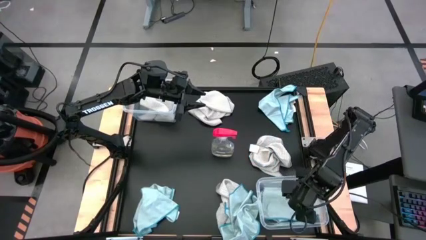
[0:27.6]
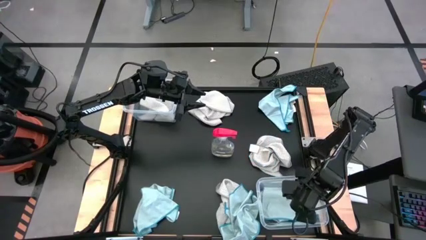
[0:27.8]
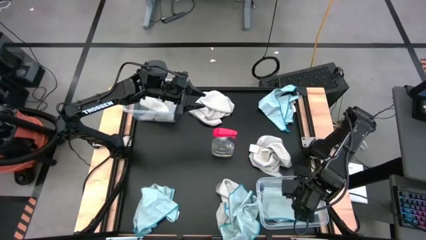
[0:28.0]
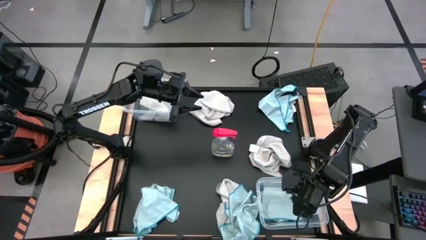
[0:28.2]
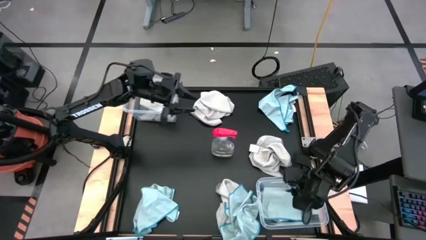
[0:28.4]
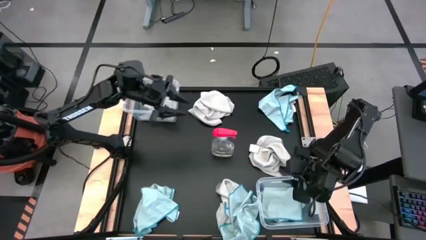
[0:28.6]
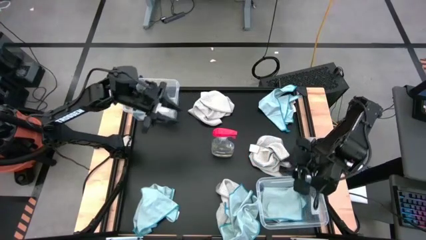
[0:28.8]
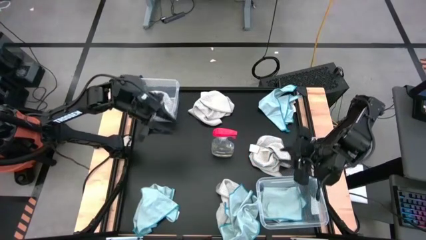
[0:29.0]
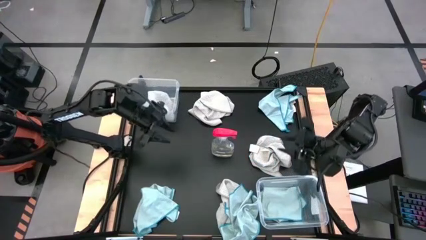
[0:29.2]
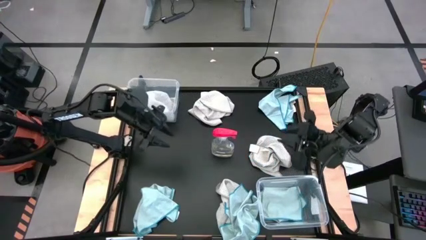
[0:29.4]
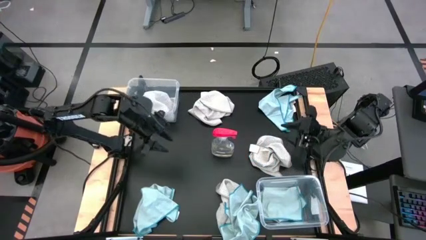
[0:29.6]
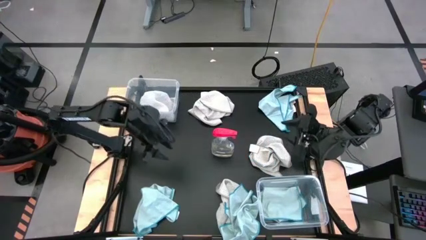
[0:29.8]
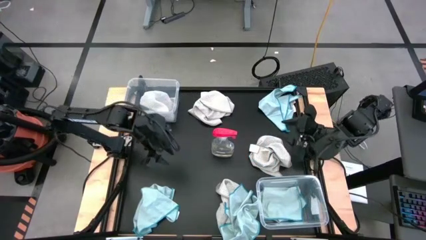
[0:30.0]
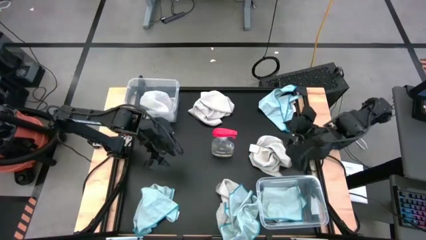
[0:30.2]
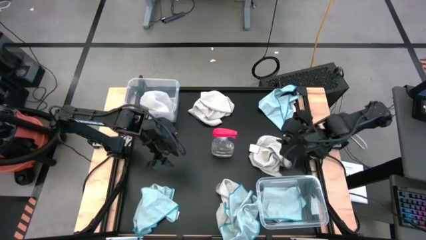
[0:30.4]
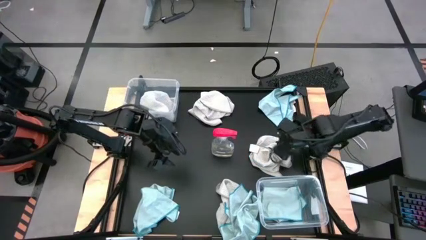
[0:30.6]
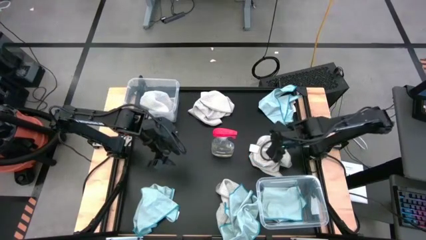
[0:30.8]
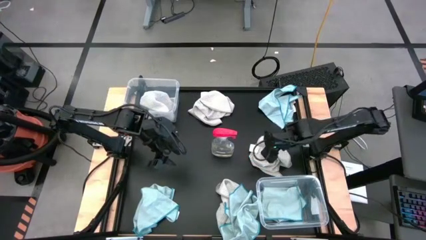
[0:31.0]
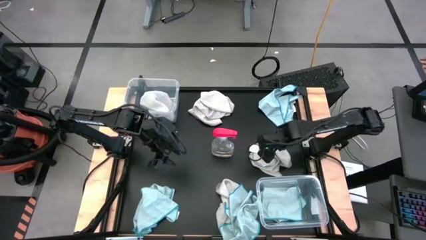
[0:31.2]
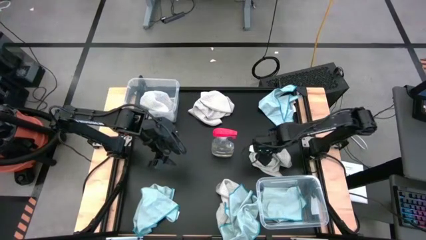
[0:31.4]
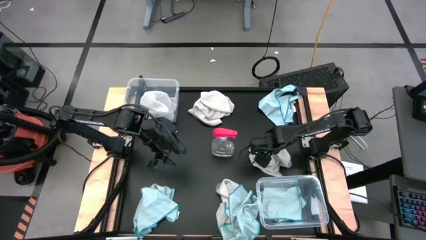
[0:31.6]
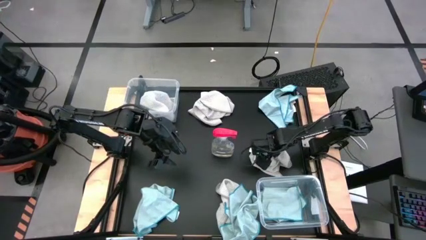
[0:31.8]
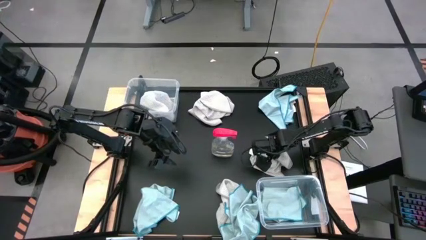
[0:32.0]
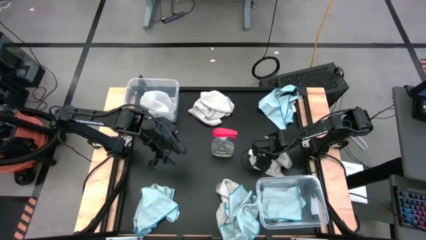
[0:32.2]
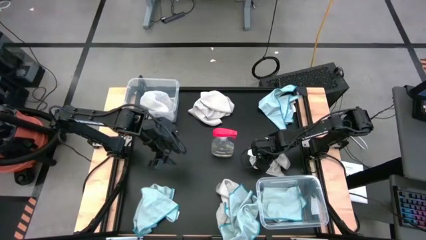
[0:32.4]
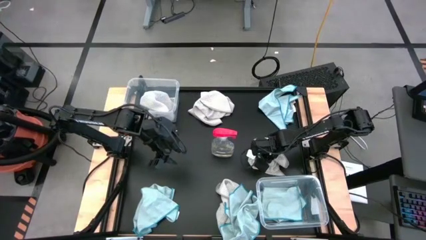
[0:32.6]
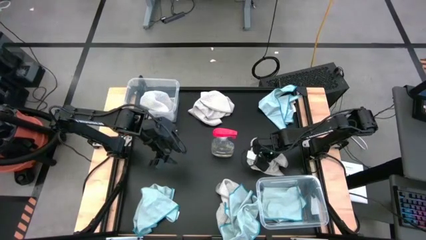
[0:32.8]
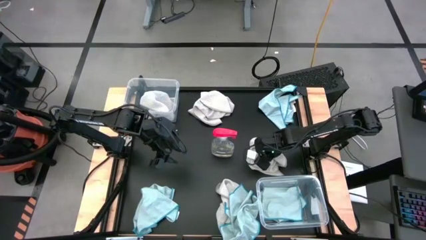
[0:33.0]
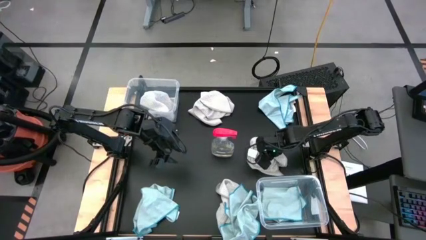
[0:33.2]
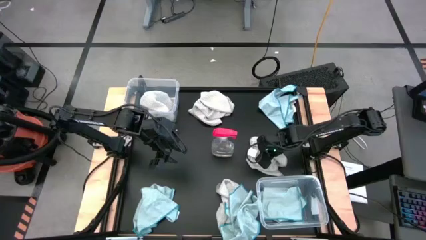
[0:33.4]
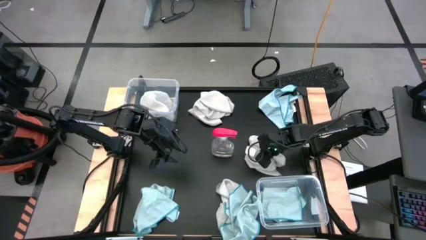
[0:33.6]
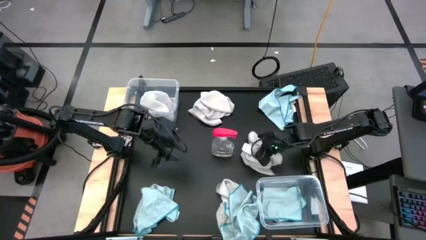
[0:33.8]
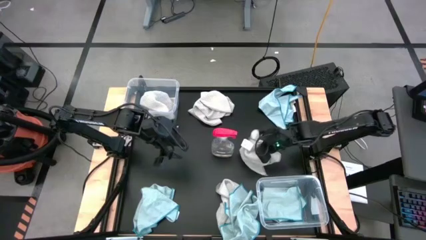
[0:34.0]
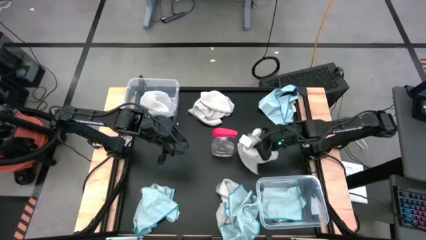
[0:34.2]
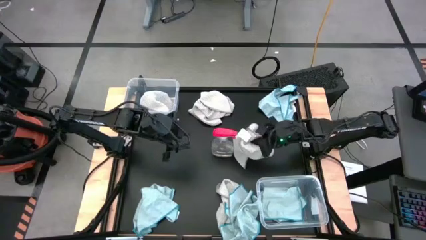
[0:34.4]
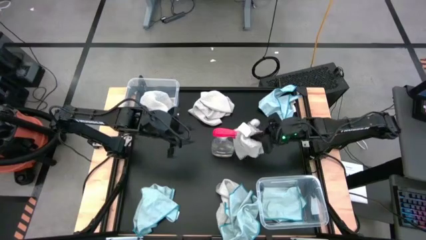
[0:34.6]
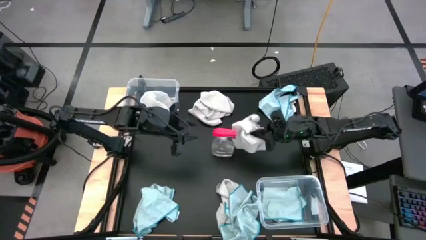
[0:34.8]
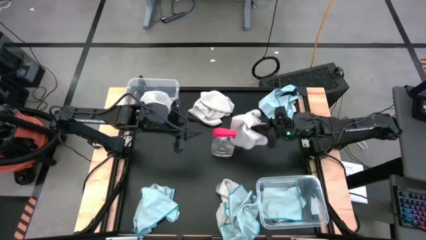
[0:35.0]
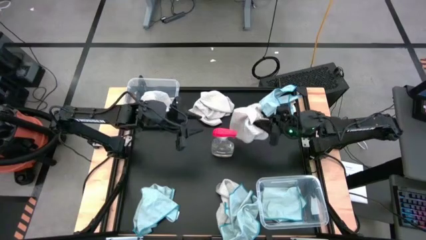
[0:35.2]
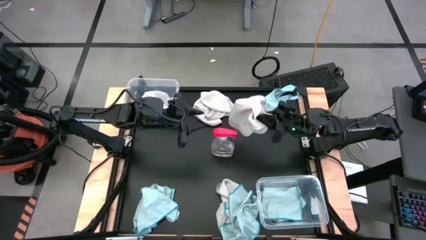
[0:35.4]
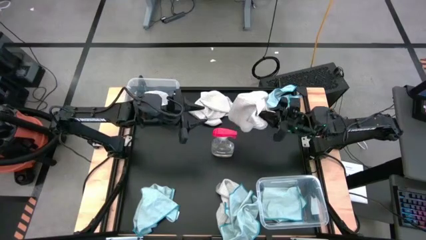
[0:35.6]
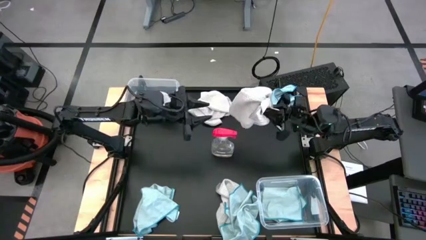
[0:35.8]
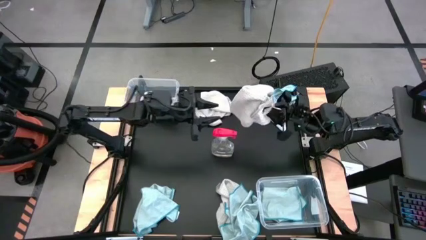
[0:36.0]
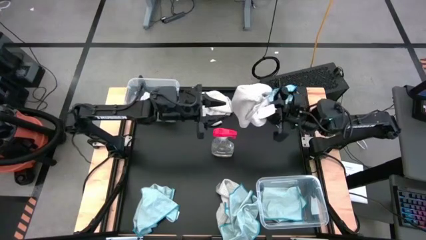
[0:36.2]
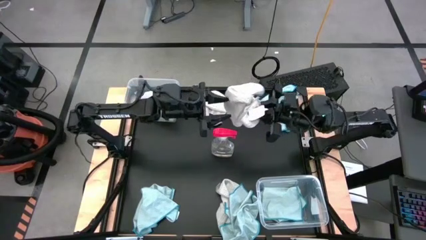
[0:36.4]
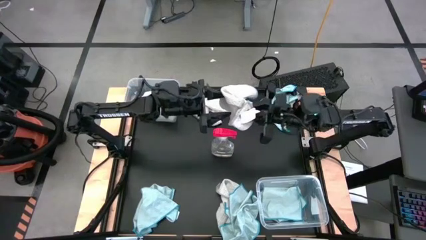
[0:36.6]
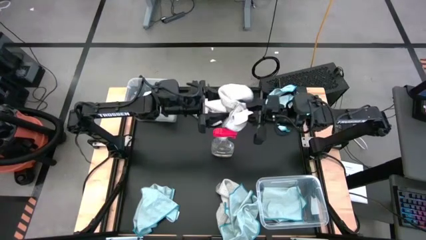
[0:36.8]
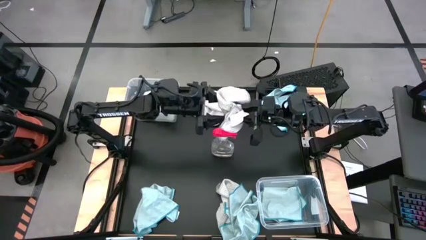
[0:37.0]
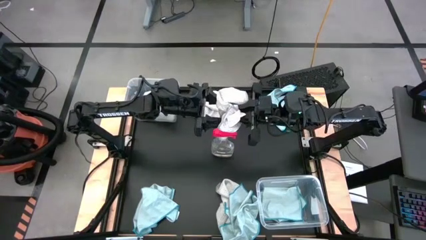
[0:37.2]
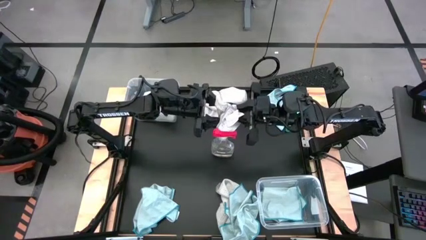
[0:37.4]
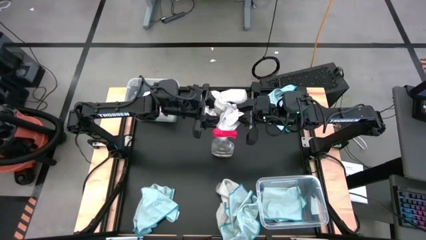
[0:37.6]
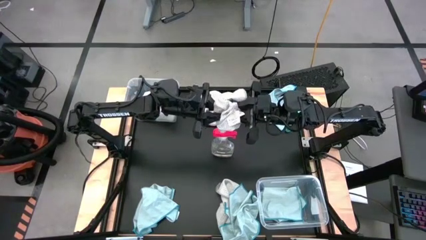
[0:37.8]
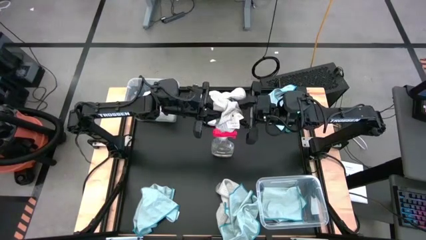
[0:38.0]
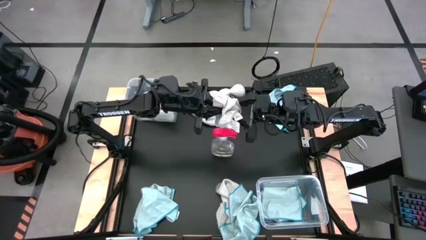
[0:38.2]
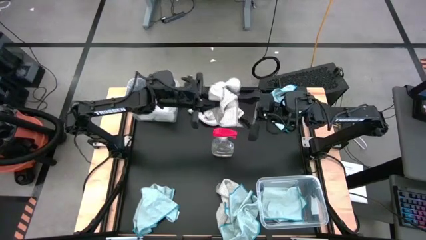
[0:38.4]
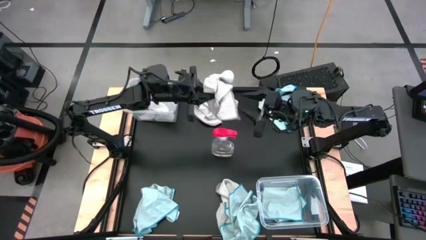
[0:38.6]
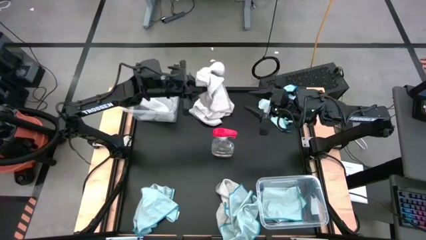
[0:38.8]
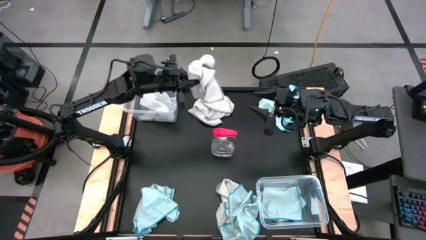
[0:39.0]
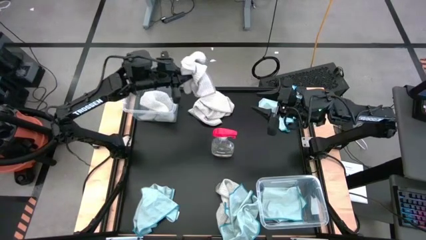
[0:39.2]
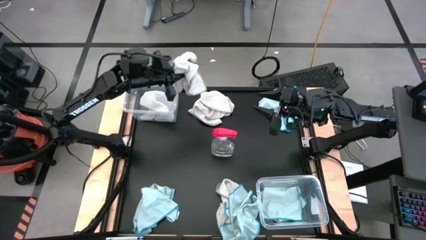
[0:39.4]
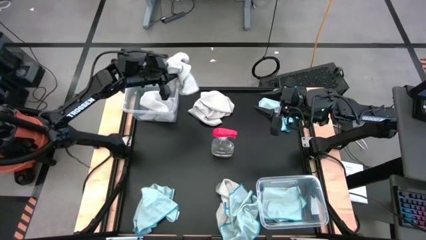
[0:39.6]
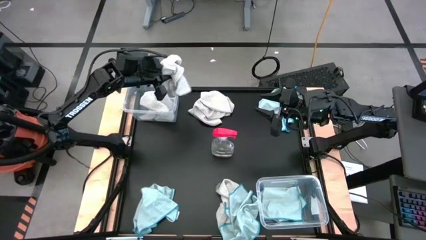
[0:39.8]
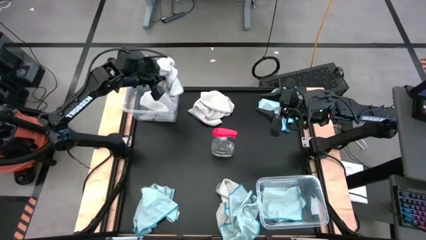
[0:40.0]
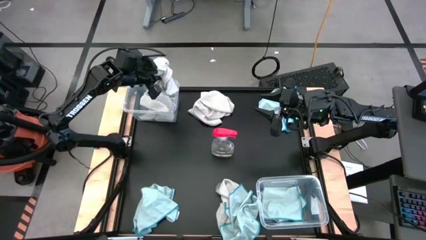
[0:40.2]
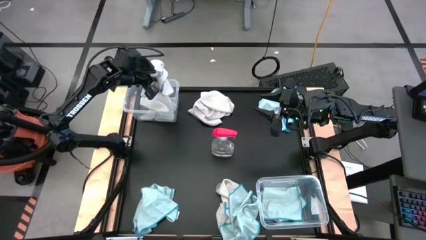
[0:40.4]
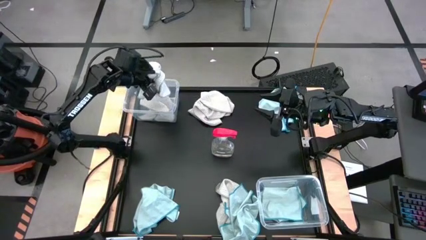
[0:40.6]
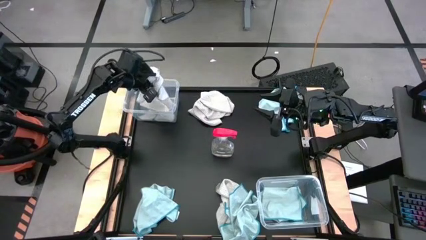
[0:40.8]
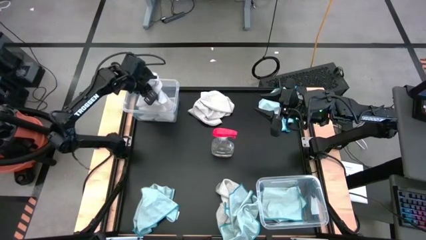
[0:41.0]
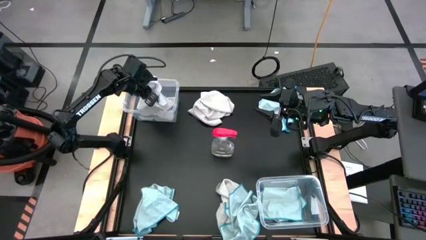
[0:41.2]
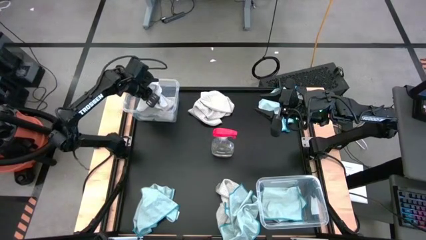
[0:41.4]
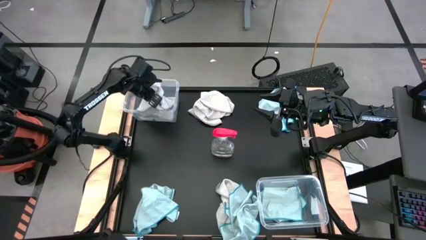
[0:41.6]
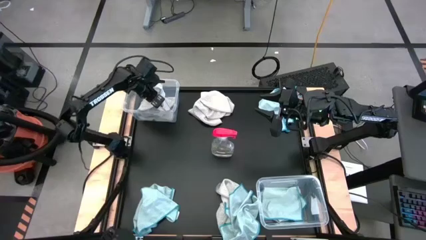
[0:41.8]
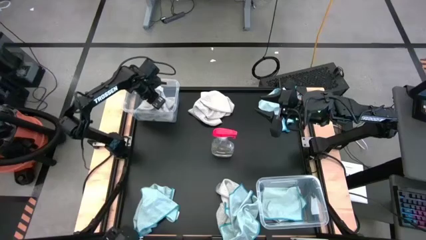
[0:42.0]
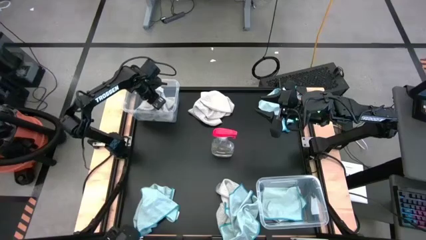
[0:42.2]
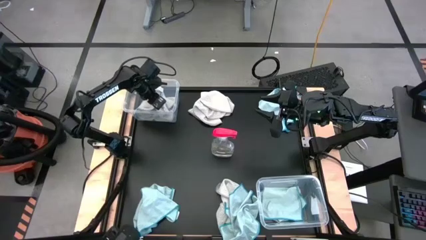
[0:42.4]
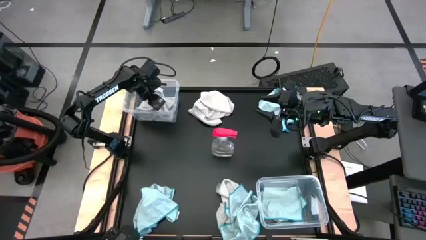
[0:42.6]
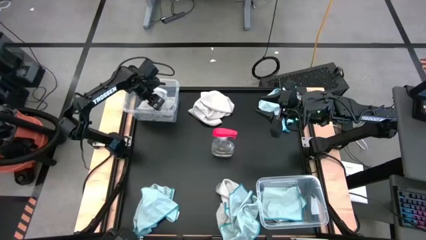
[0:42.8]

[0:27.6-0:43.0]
Task: Sort microfiber towel by color & place in baskets
Put the gray towel into the top transparent bin
